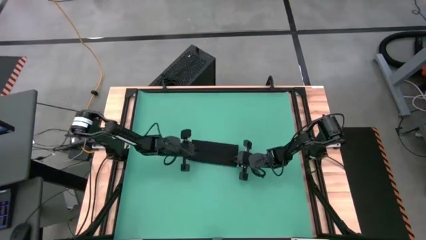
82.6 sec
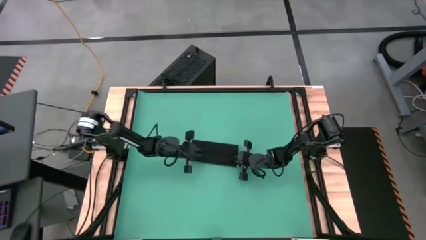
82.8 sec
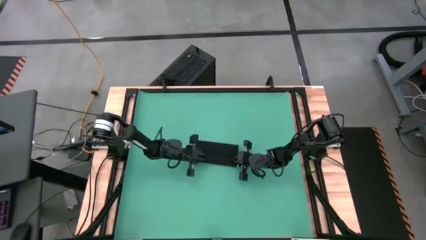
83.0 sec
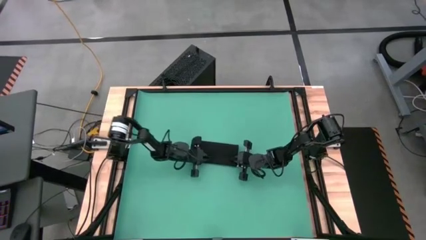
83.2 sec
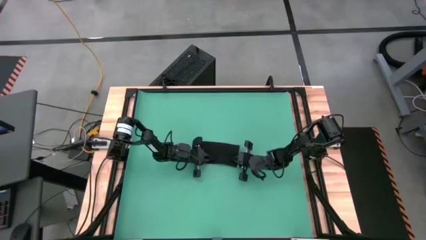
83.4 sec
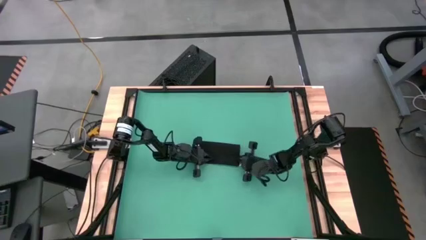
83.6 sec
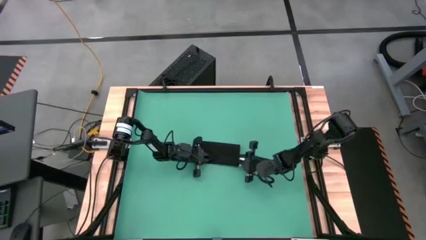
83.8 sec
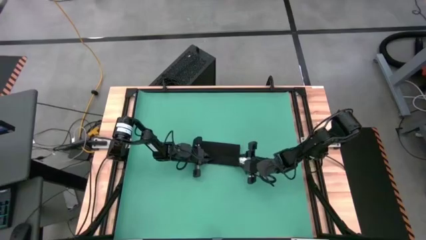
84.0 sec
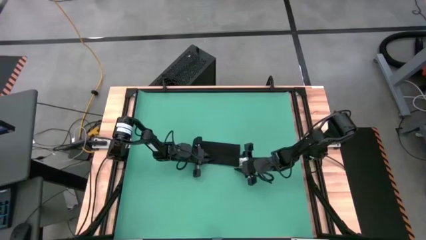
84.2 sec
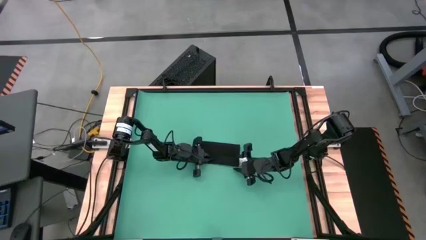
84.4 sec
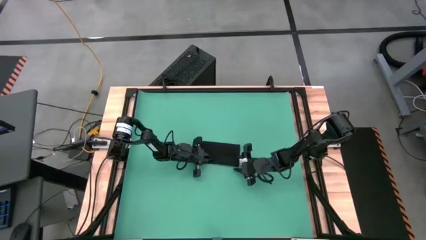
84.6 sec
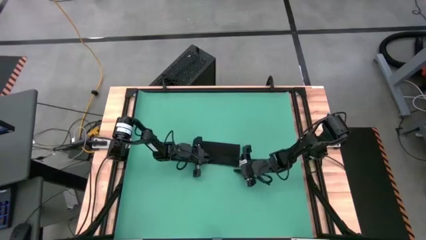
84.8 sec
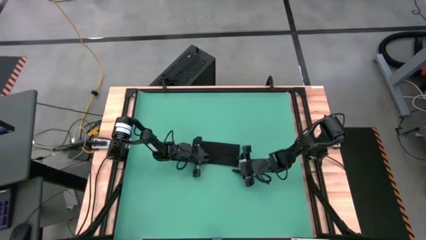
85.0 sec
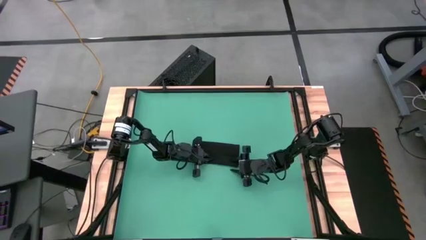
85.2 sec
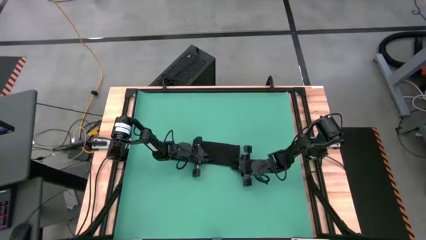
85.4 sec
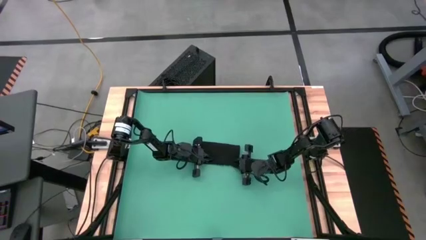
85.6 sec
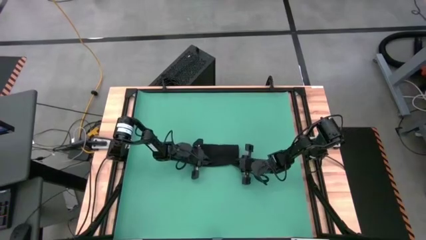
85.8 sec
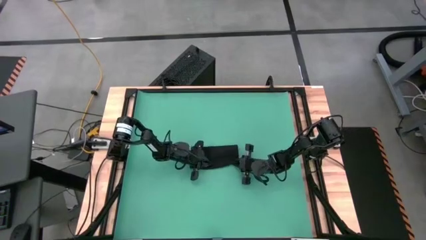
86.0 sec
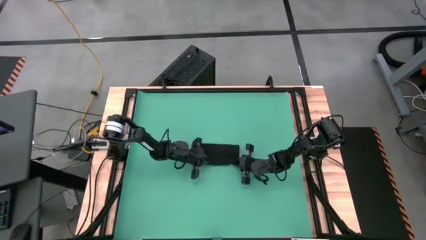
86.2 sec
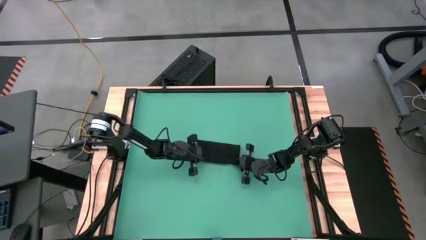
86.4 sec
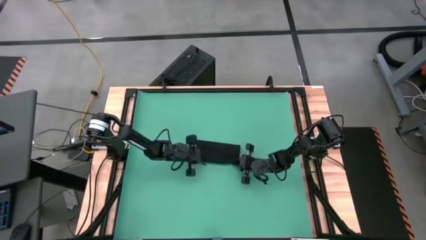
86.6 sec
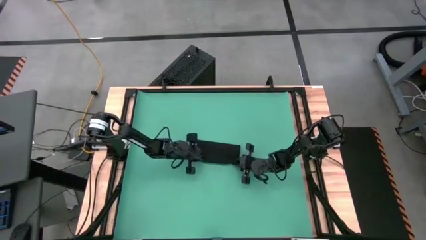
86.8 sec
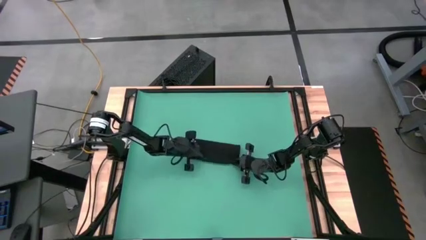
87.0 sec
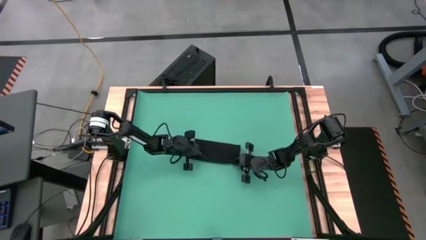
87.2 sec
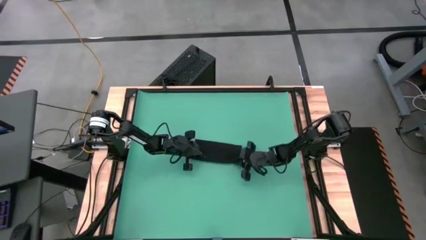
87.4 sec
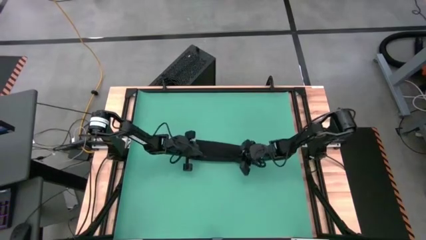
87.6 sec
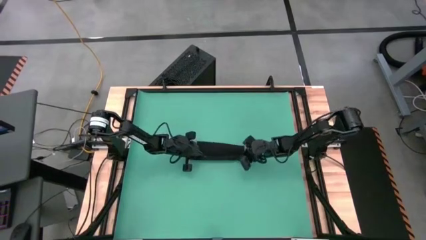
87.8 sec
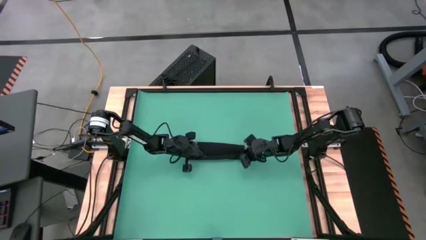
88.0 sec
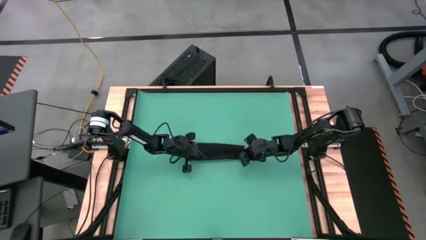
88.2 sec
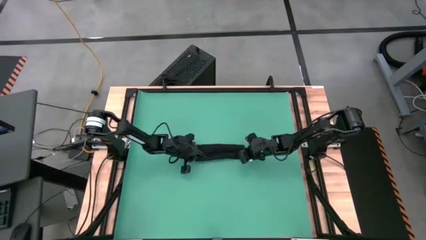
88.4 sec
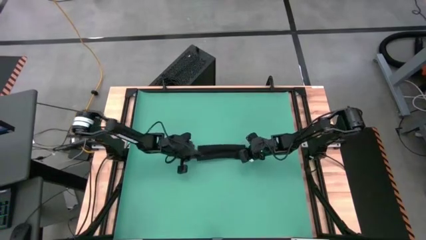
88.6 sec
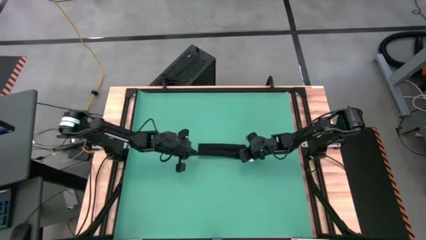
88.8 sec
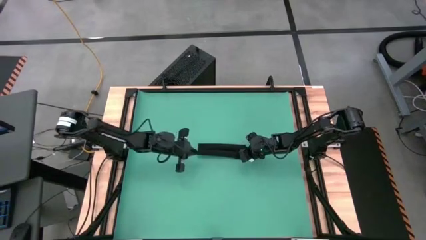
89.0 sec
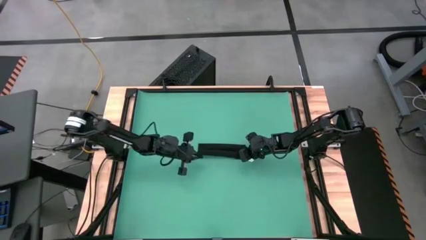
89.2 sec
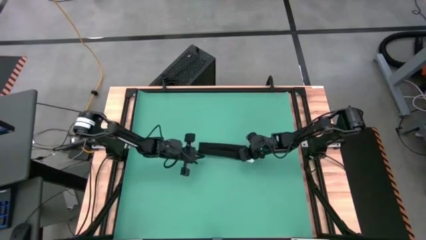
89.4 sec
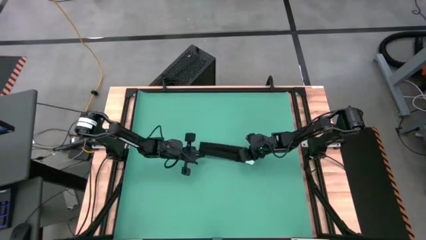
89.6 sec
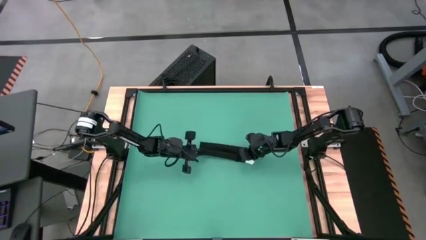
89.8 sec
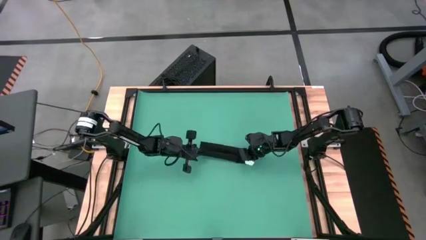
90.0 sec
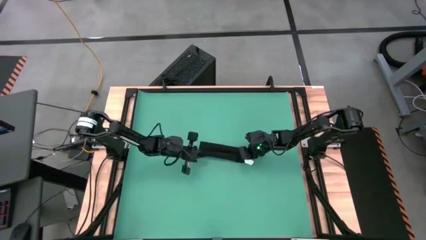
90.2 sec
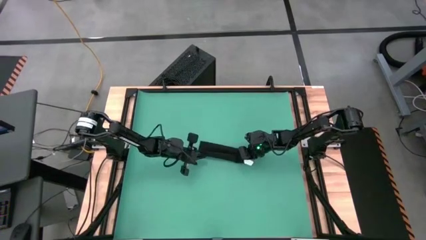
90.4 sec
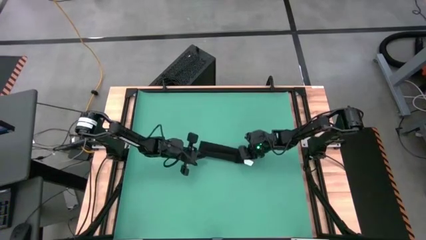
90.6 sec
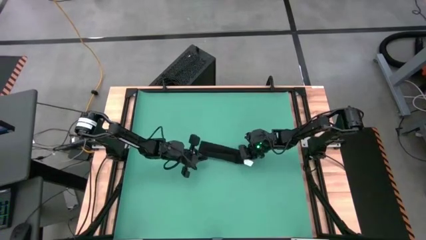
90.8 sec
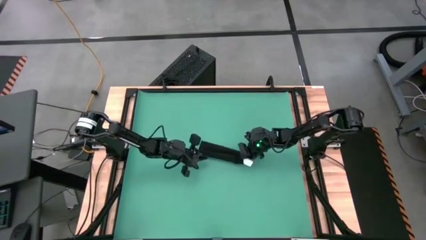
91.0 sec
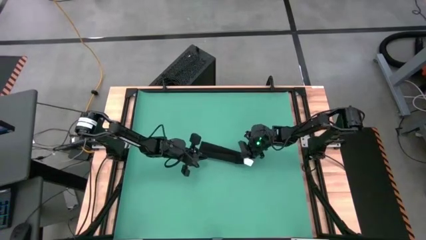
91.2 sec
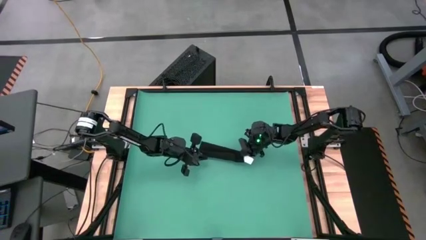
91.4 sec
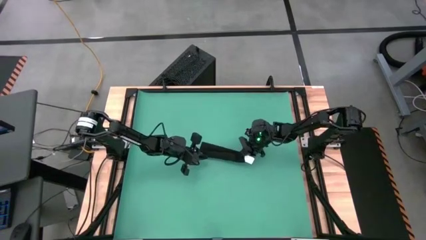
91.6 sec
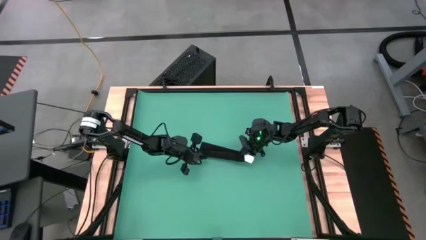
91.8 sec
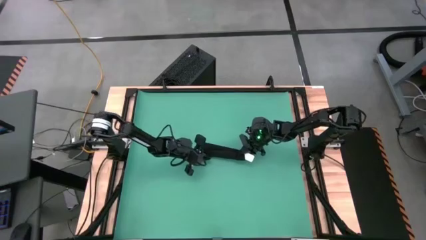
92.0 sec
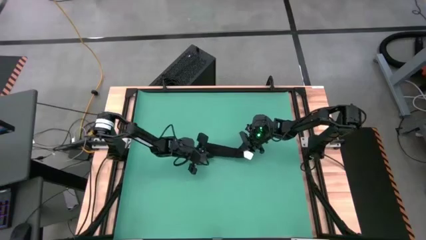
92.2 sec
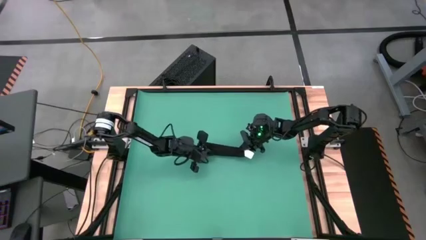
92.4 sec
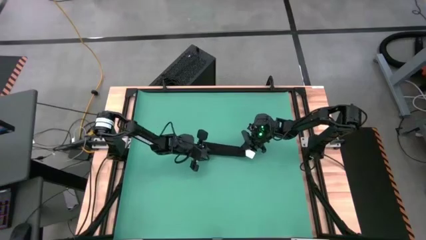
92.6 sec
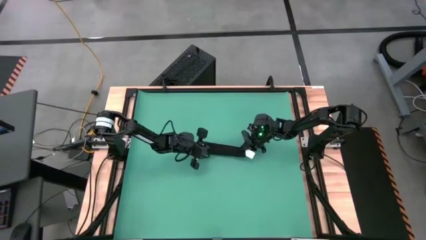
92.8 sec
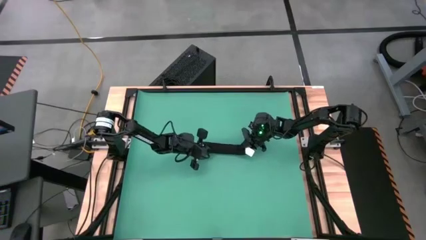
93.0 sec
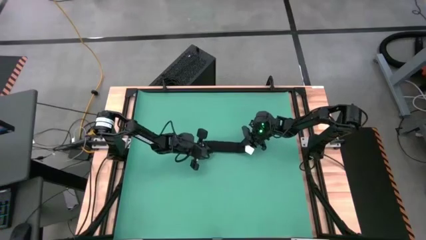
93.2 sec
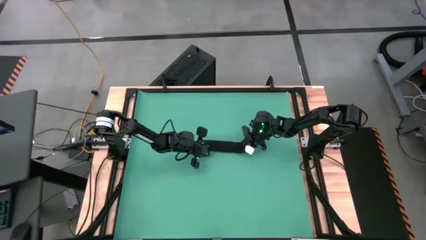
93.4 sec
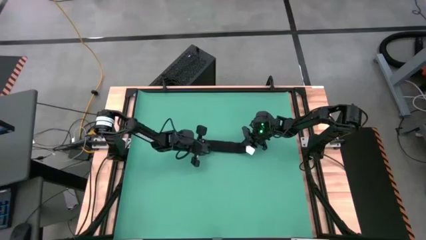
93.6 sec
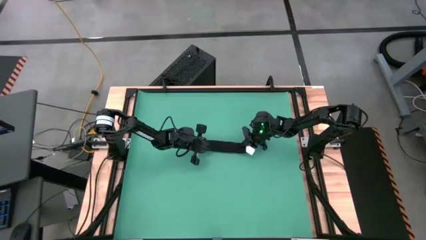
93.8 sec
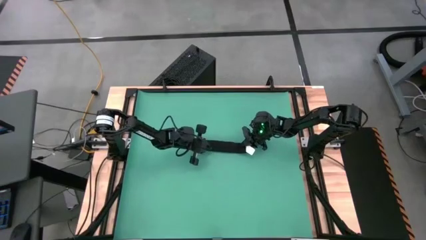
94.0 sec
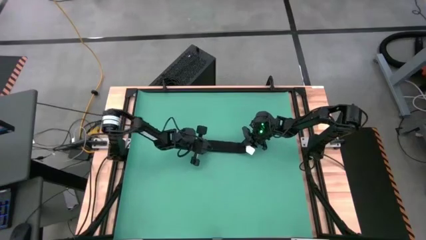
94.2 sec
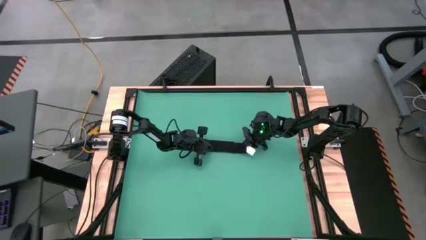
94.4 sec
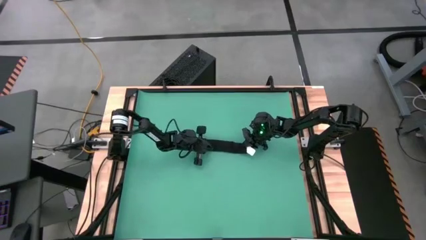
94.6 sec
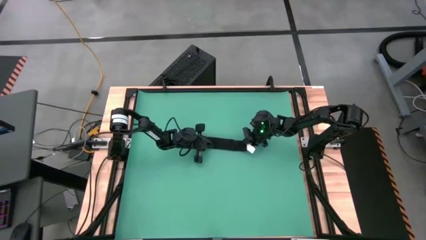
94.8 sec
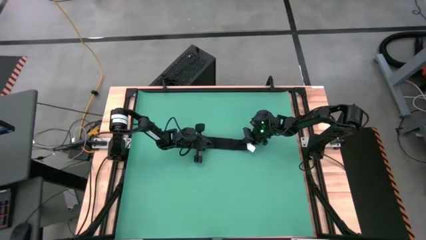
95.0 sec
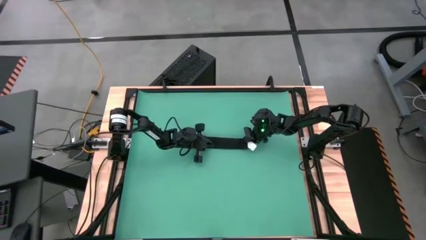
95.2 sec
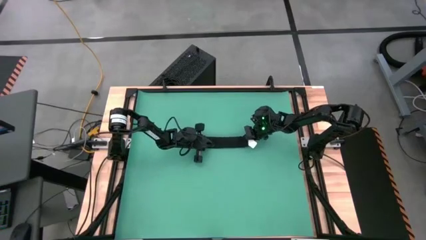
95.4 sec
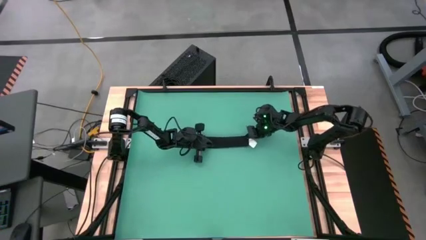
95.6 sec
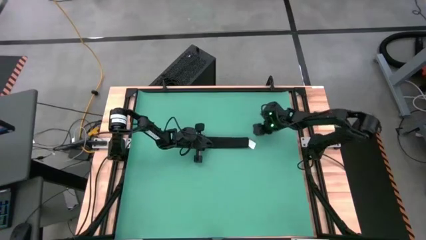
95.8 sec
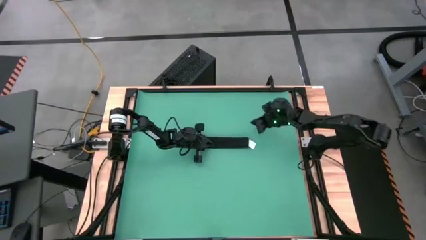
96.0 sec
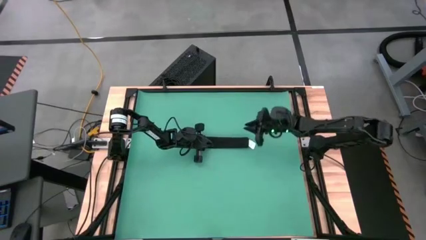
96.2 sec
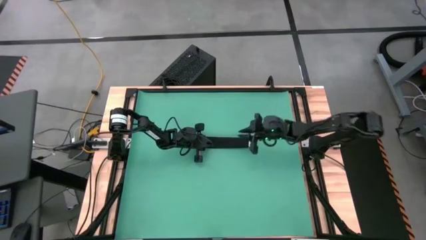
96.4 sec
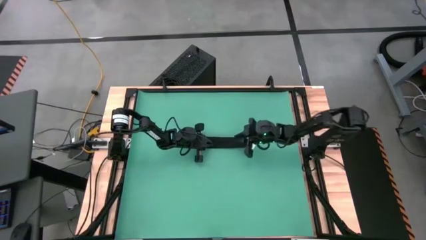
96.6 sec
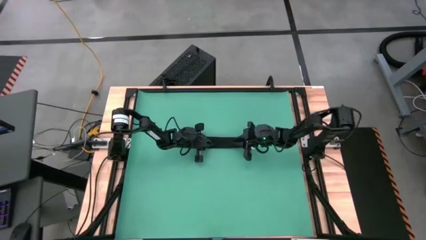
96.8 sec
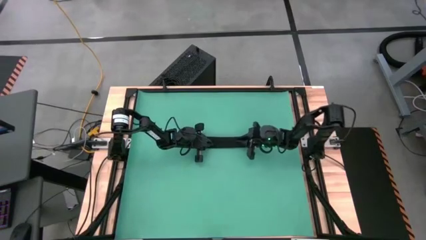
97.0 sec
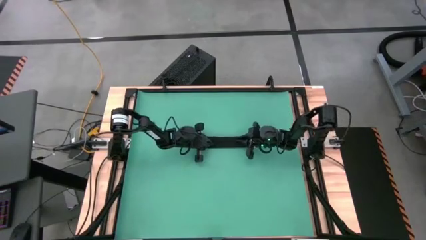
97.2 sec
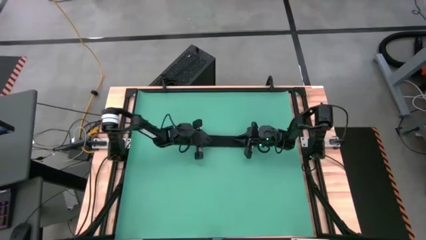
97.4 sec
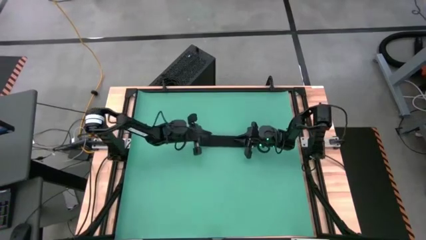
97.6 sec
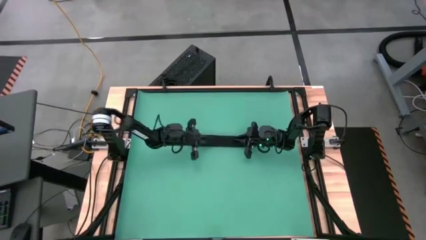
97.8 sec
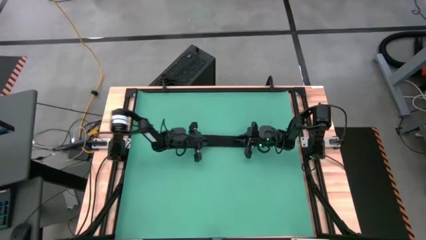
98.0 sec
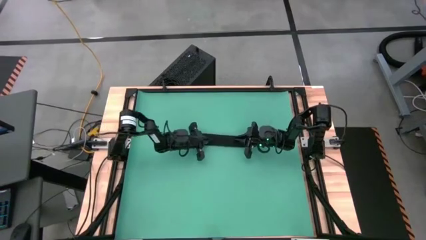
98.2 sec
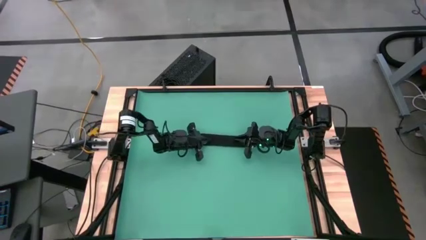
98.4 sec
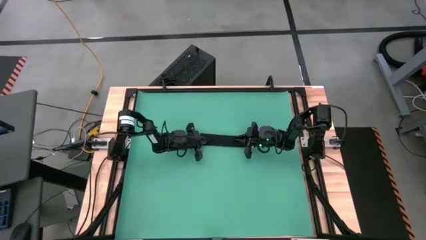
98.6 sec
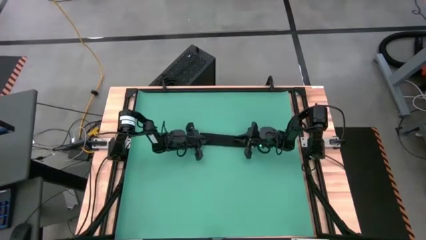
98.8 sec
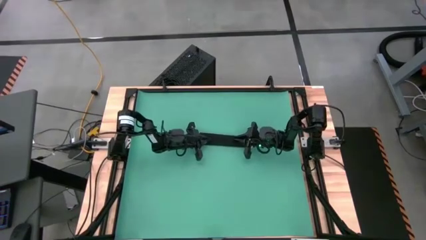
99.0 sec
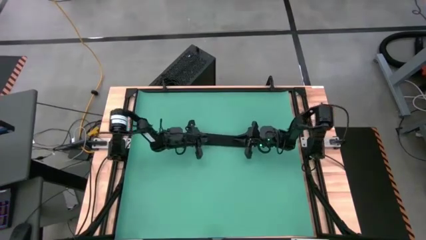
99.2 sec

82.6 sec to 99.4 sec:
Task: Roll towel
Roll the brown towel
